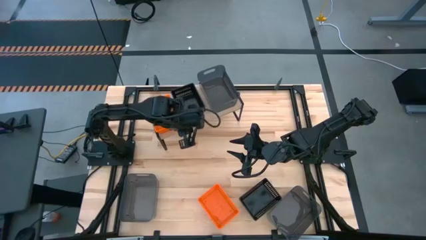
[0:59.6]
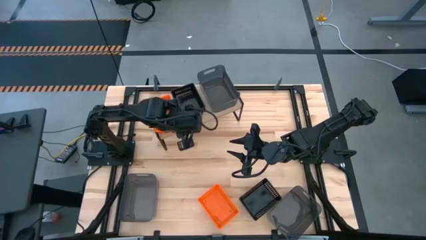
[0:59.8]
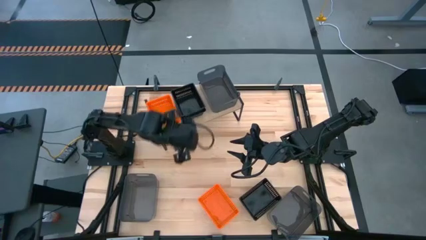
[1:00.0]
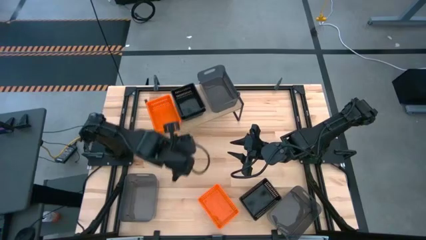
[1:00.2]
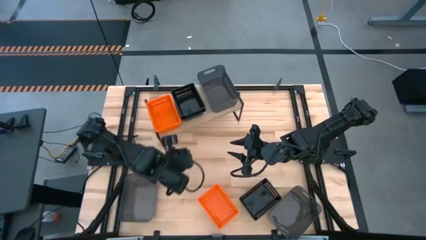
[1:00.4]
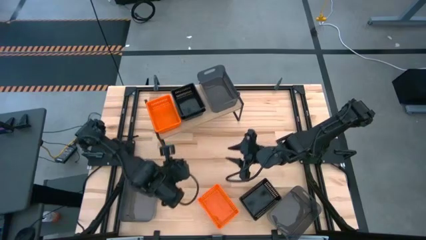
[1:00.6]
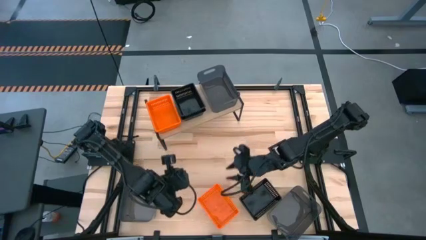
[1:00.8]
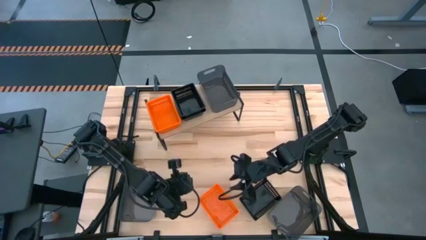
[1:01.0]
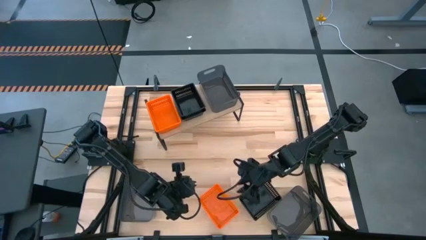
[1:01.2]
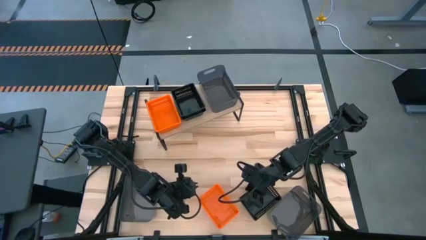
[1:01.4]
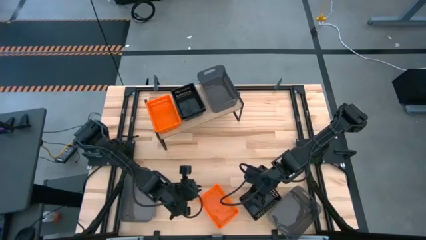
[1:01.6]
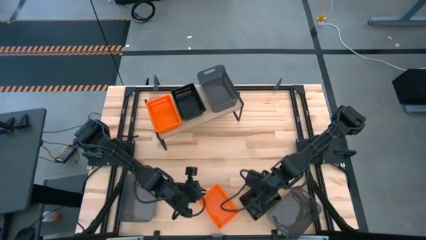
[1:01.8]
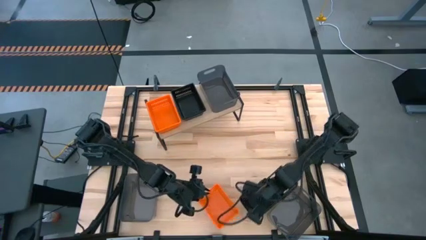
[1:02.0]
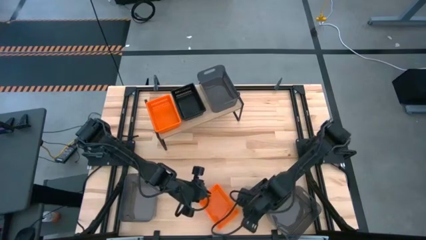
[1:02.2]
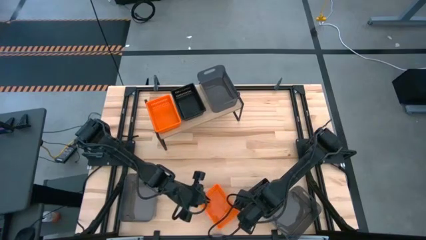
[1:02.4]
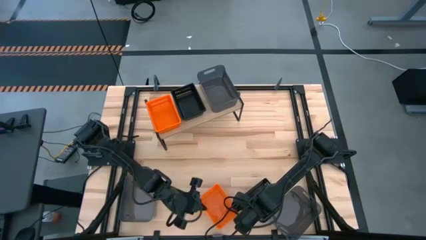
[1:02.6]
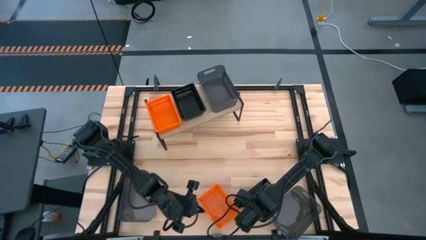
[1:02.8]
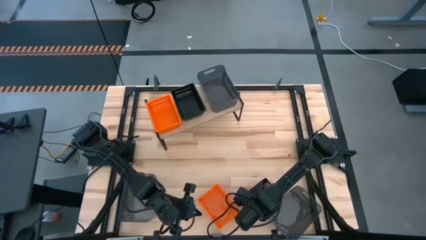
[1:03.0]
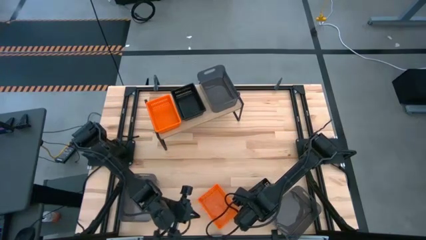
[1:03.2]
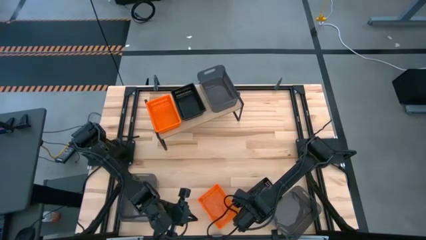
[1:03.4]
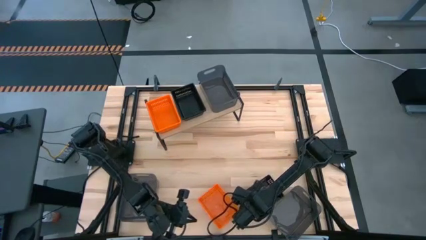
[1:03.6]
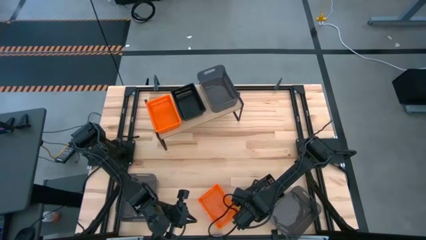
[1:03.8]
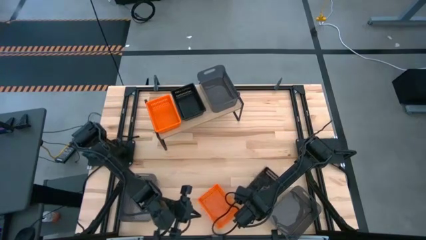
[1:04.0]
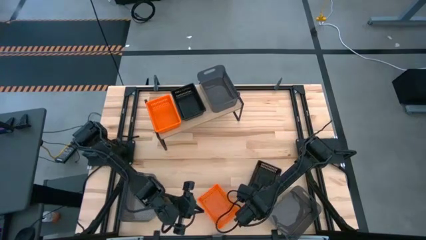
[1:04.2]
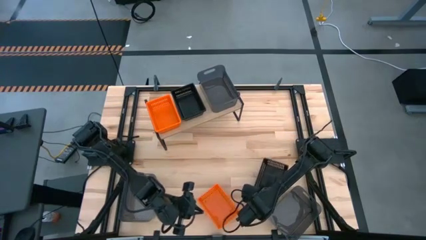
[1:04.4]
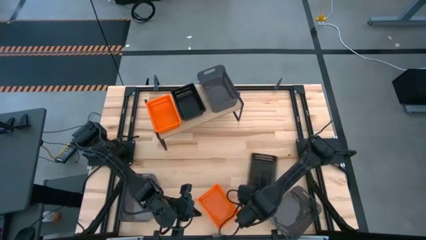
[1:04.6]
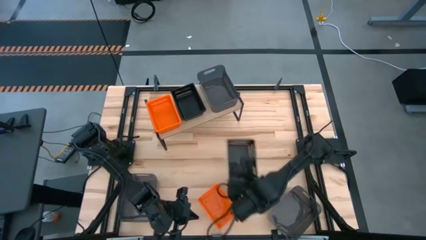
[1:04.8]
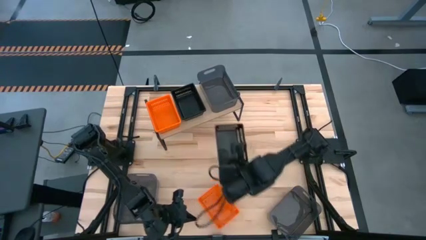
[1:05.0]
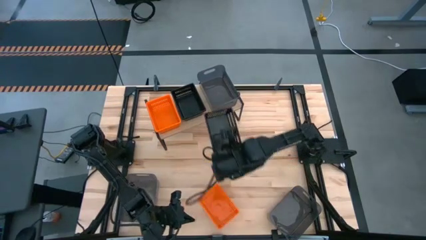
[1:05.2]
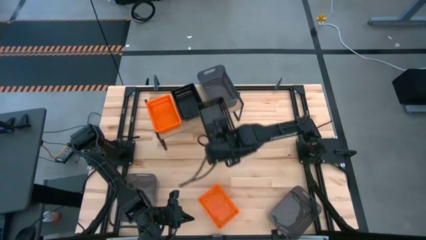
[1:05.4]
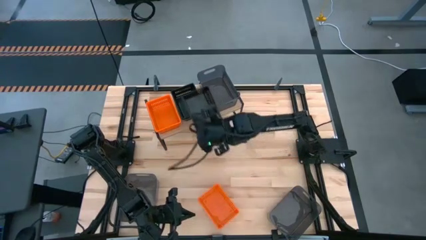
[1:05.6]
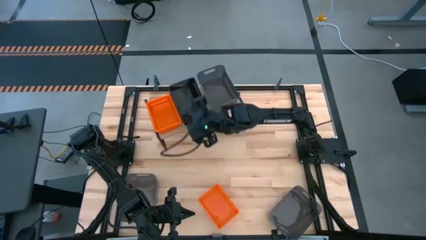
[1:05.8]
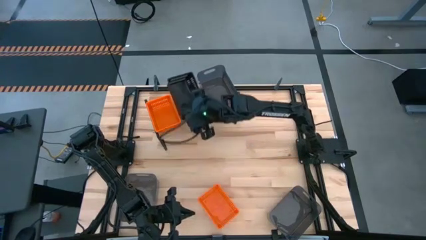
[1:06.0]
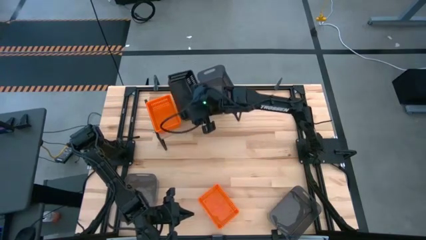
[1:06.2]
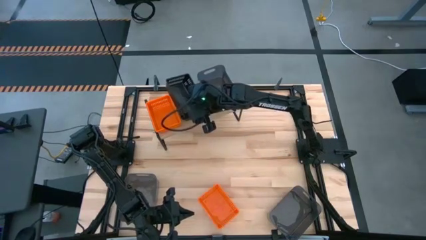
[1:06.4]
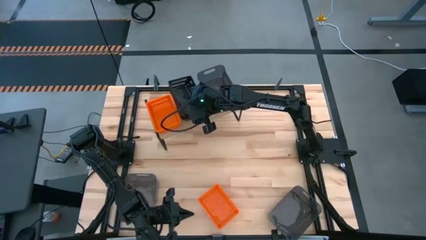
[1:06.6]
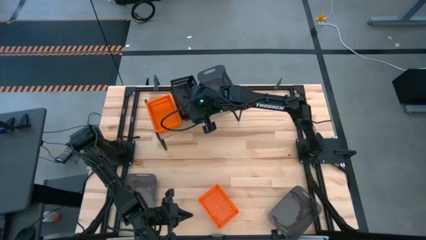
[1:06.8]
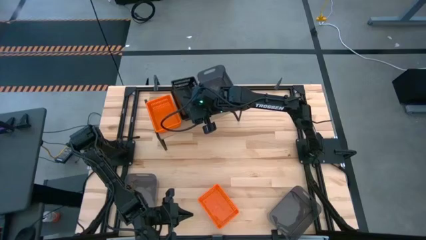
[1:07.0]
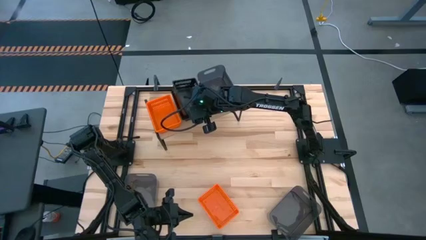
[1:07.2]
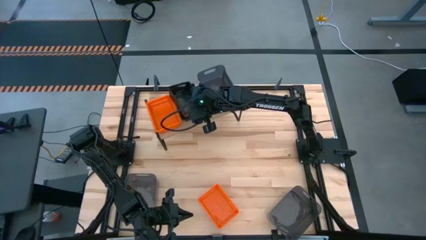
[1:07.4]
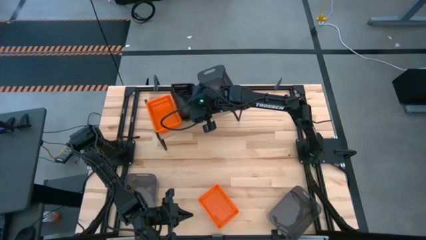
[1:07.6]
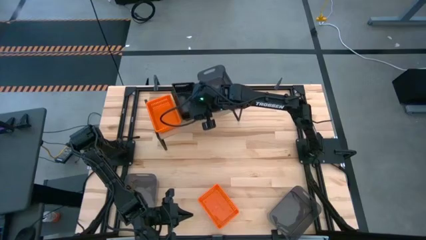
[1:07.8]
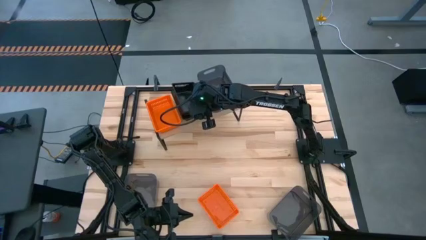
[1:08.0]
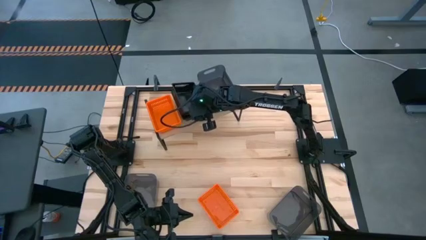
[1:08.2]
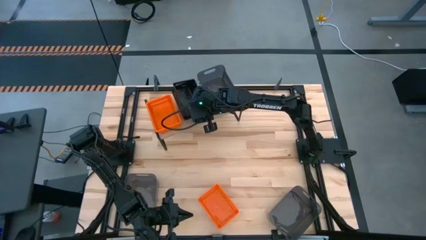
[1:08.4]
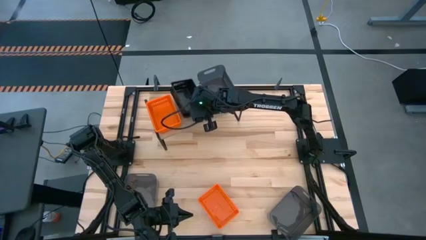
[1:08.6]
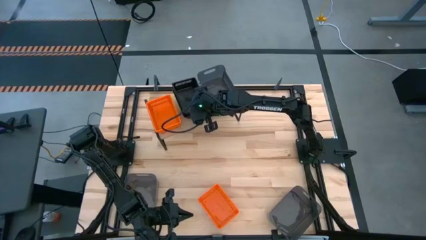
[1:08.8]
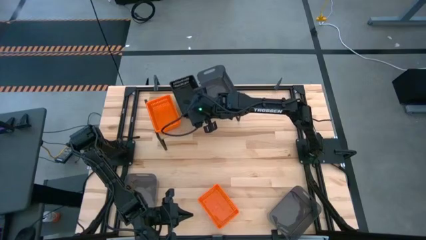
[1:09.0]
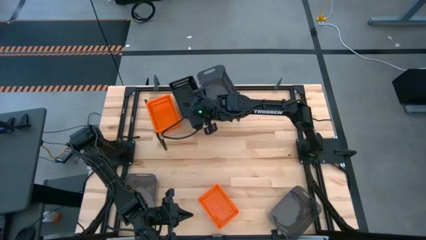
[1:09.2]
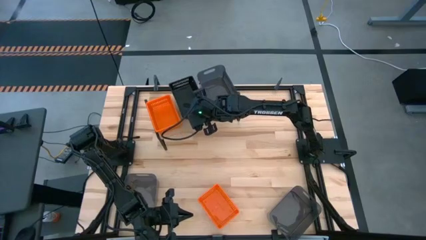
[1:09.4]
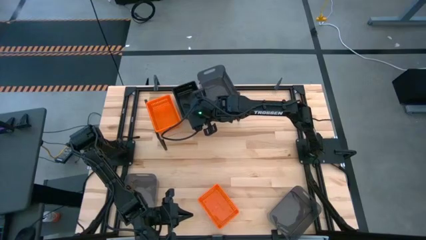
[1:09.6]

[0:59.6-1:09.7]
Task: Stack baskets on shelf by color
Stack the black bin on top of the black bin on the shelf
